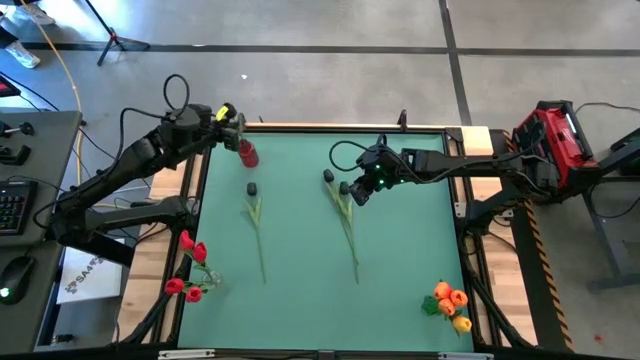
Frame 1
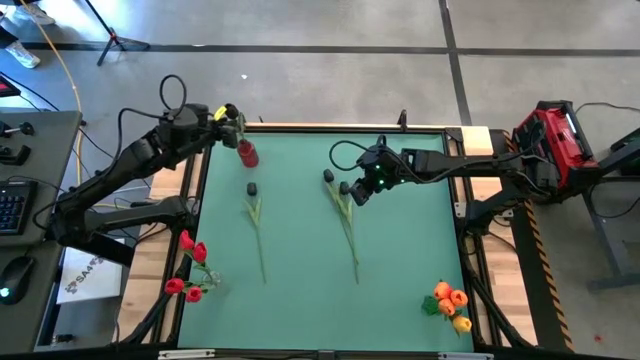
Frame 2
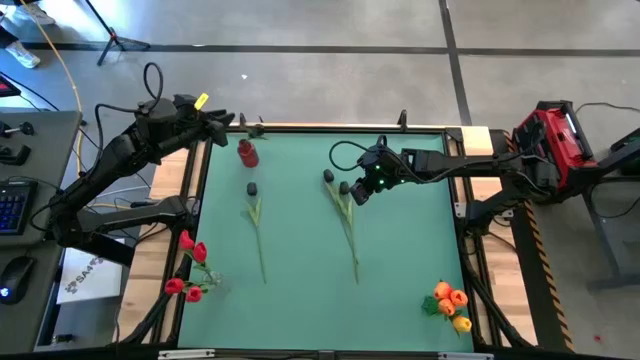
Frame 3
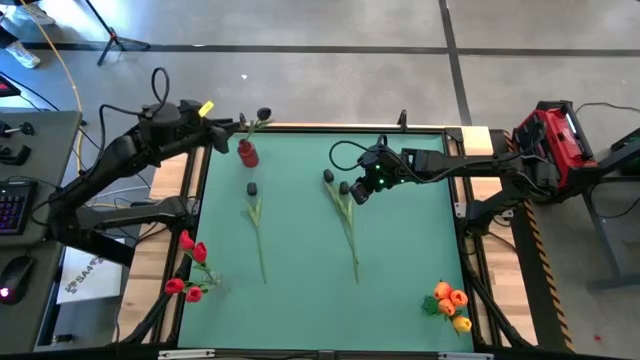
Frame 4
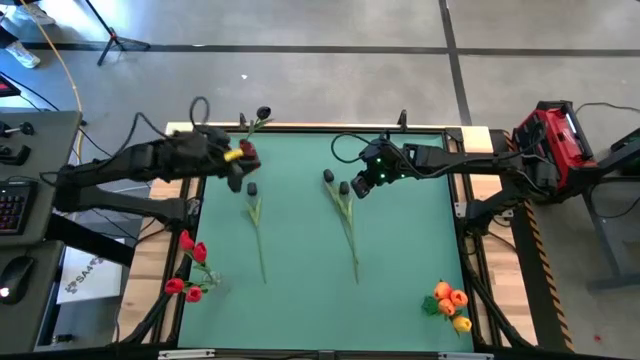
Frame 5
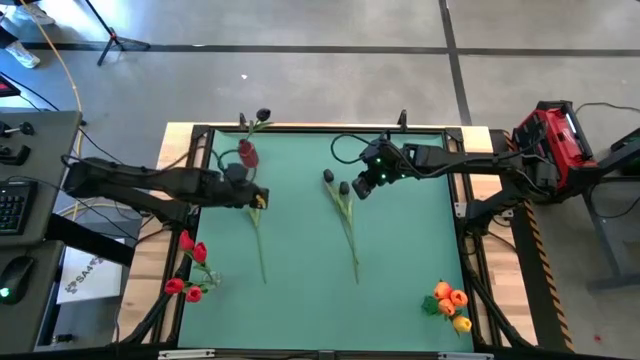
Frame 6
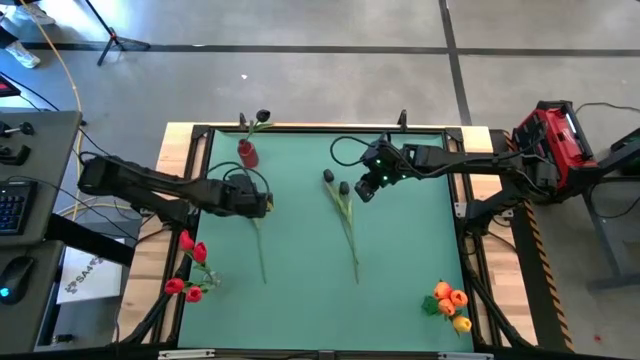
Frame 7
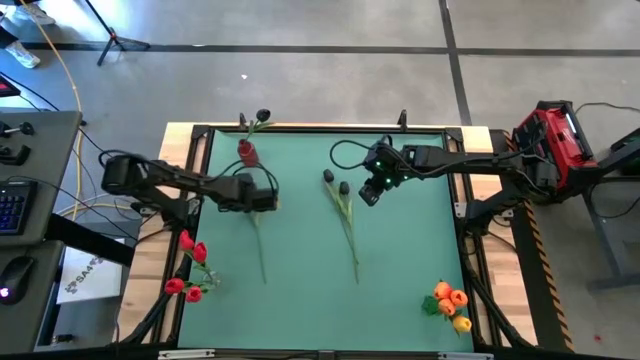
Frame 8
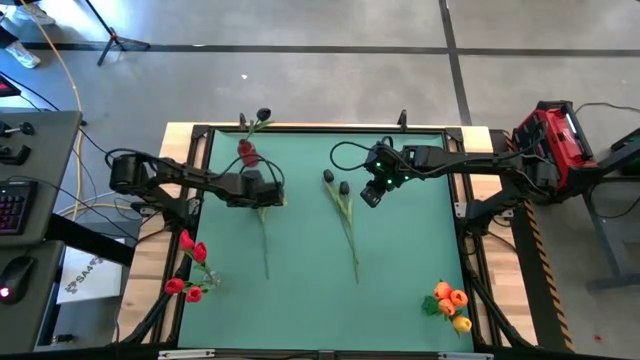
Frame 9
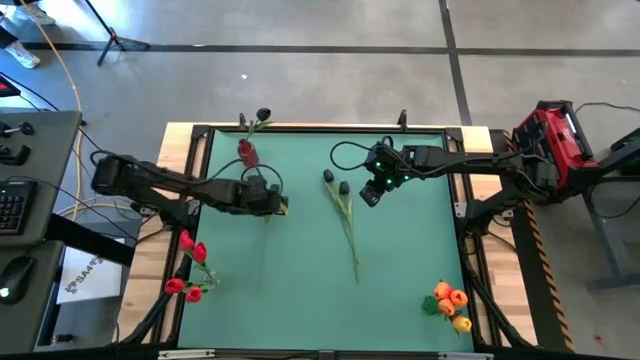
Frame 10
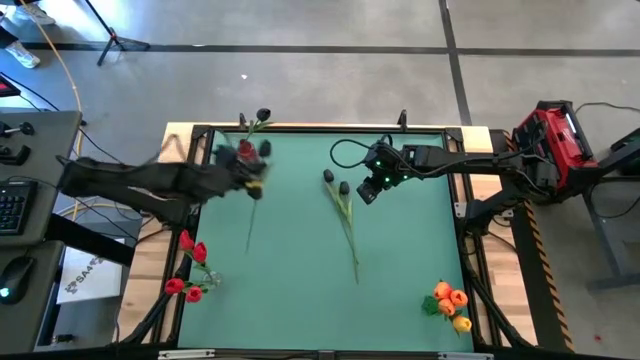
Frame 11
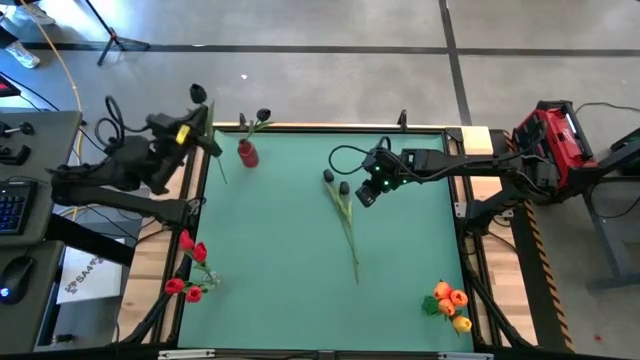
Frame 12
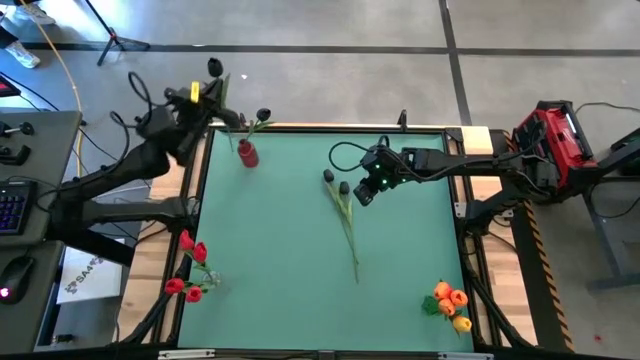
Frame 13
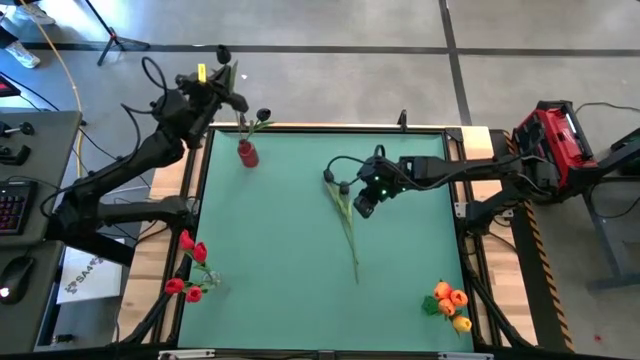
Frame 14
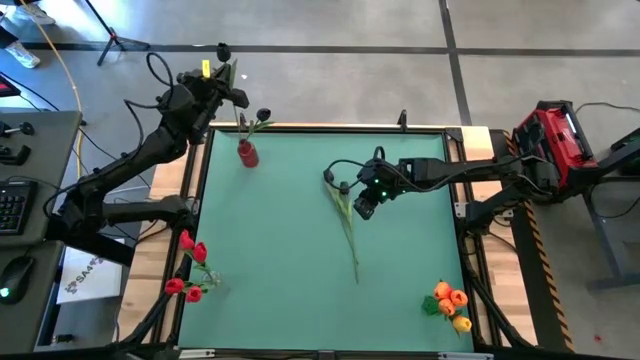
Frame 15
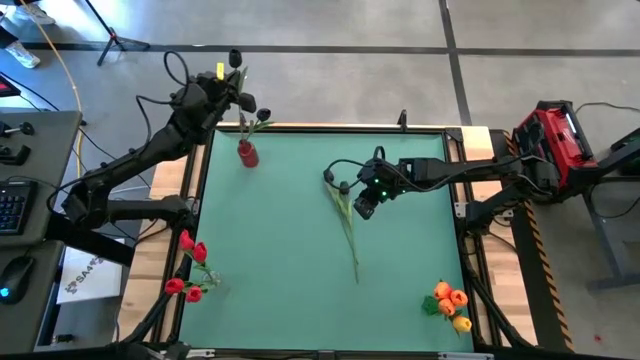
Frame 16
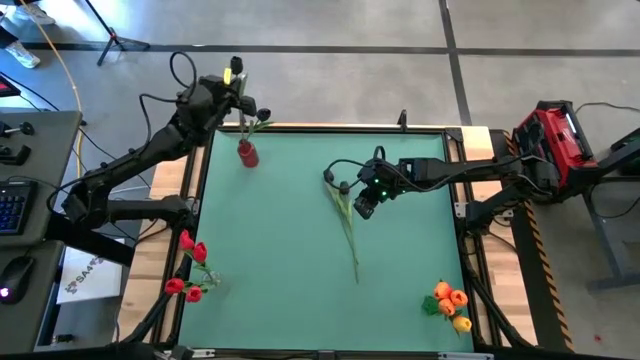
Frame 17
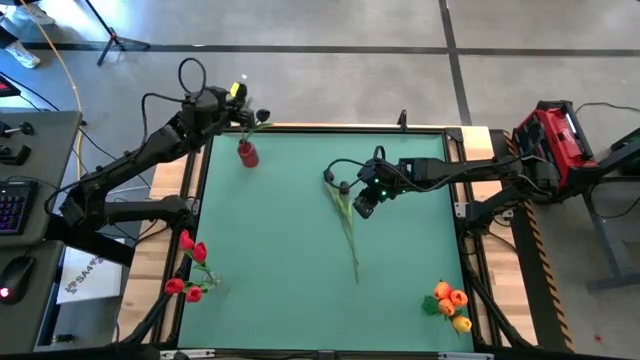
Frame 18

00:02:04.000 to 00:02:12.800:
Task: Sort flowers into vase by color
Put the black flower into the red vase

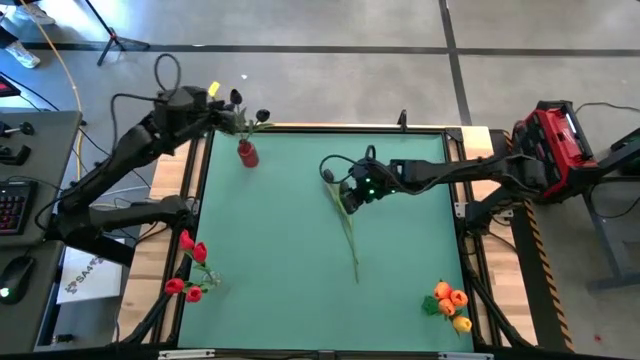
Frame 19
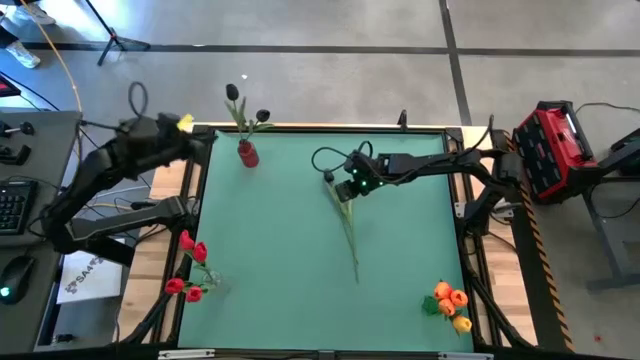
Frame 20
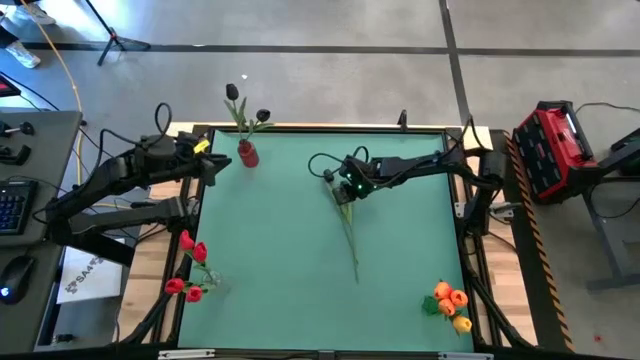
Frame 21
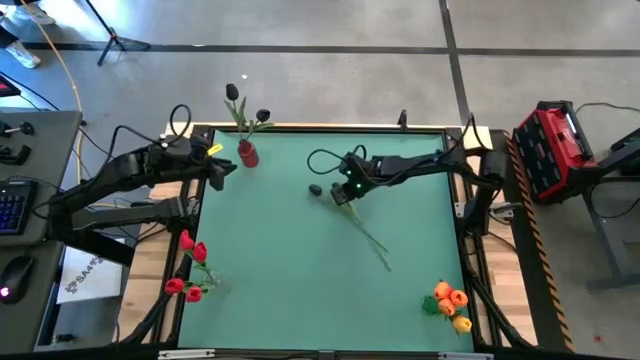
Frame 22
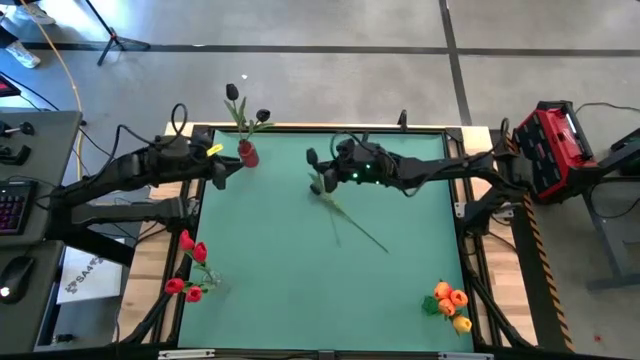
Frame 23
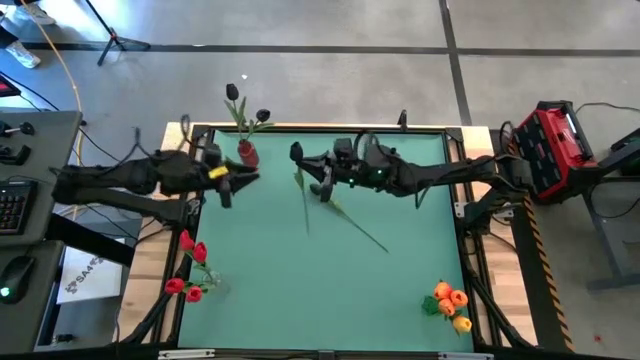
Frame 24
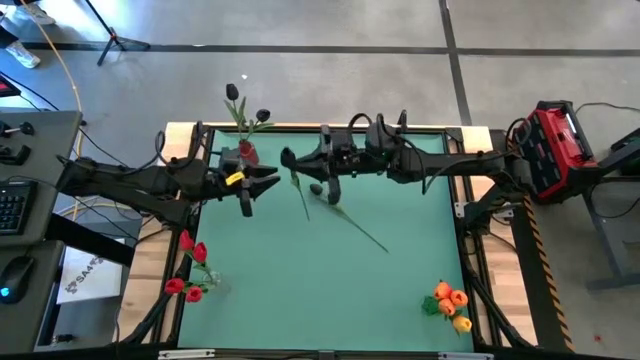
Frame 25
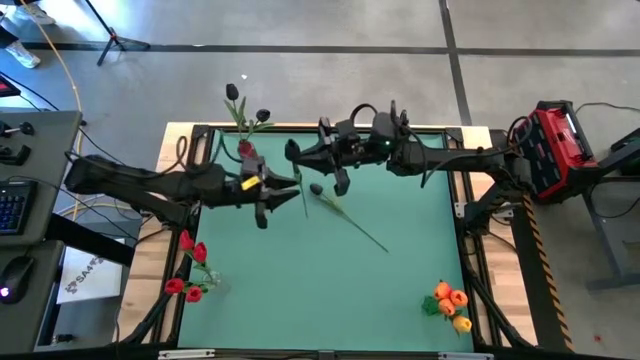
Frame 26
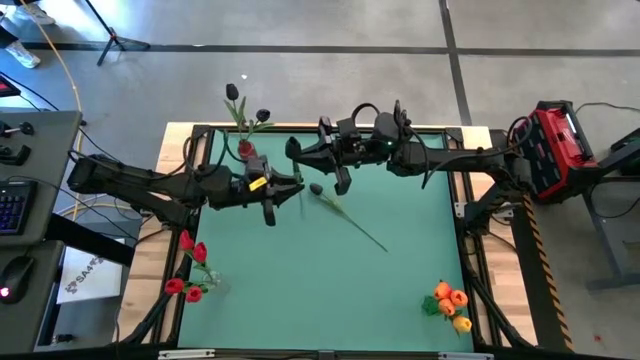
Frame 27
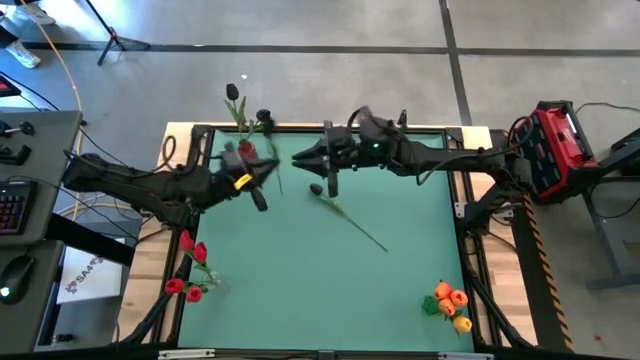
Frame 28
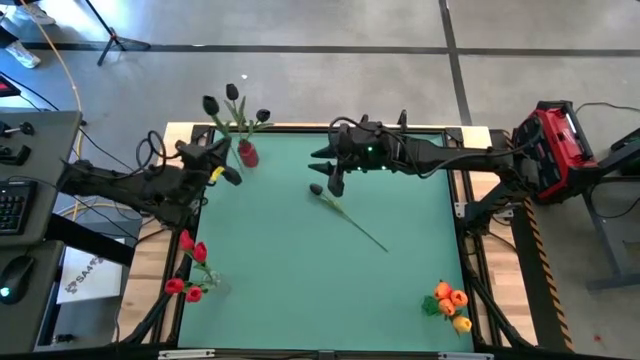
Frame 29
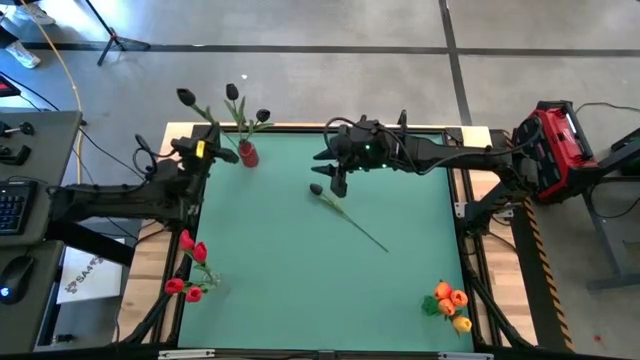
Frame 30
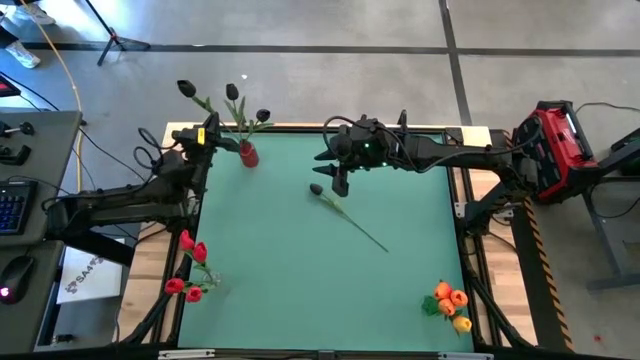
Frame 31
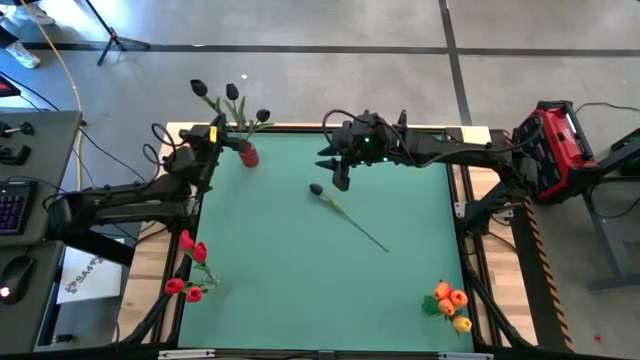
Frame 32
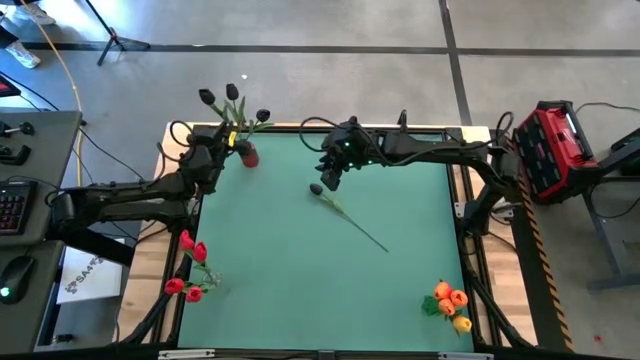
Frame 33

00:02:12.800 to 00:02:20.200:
Put the black flower into the red vase
